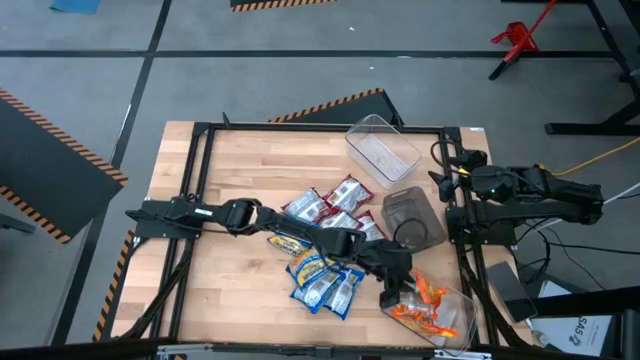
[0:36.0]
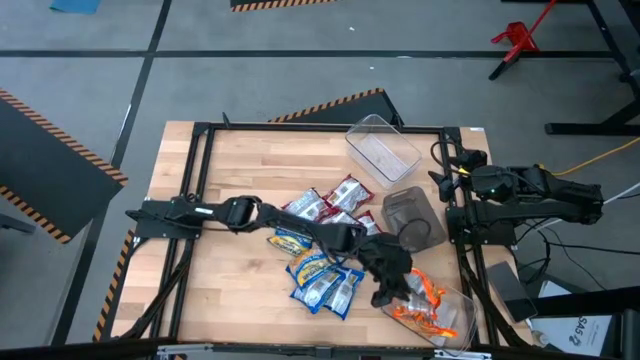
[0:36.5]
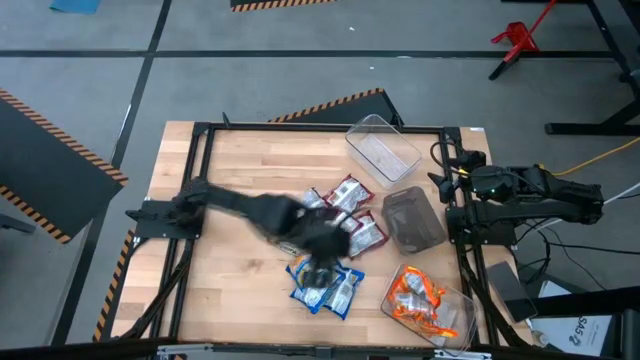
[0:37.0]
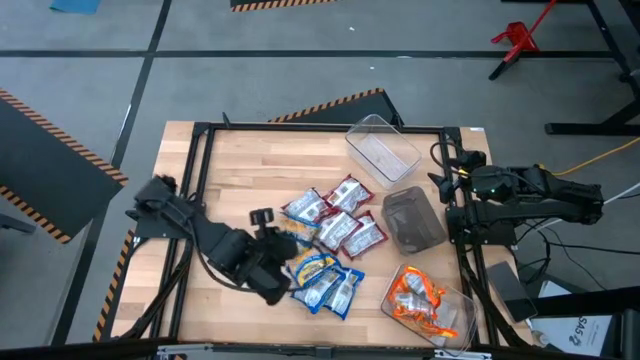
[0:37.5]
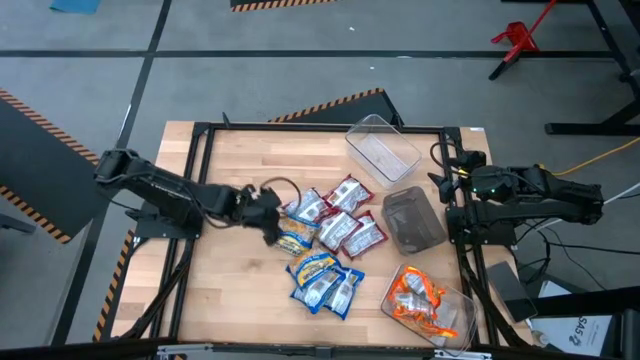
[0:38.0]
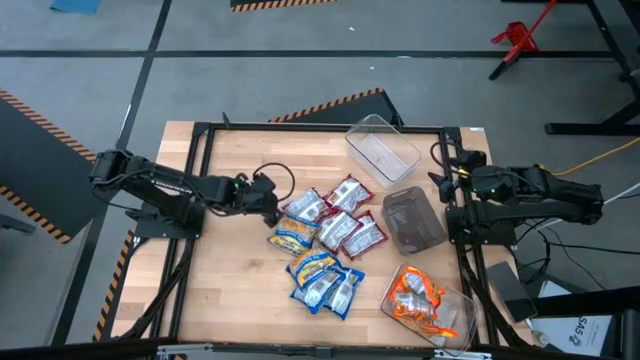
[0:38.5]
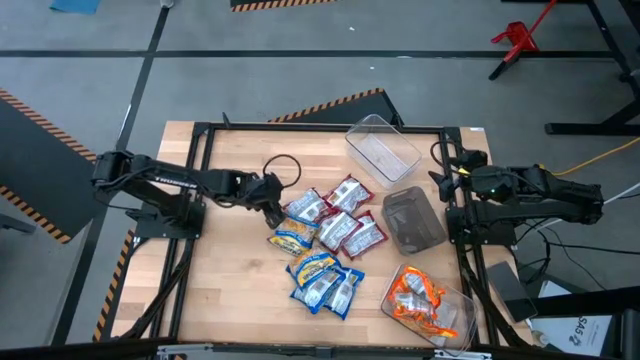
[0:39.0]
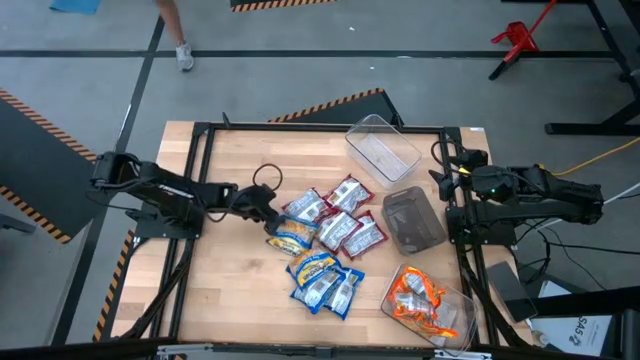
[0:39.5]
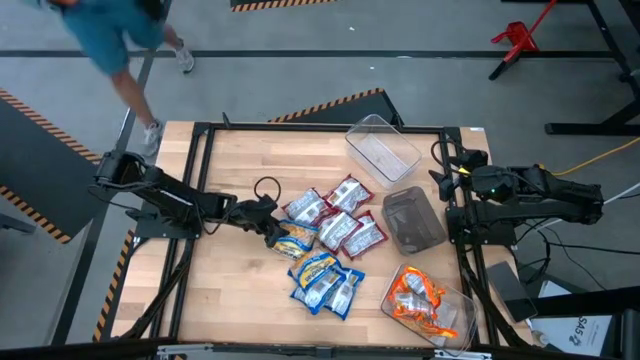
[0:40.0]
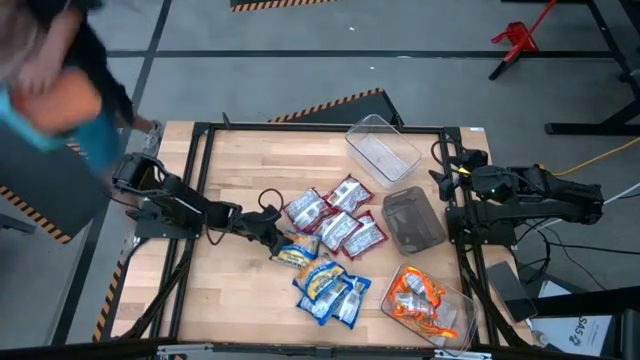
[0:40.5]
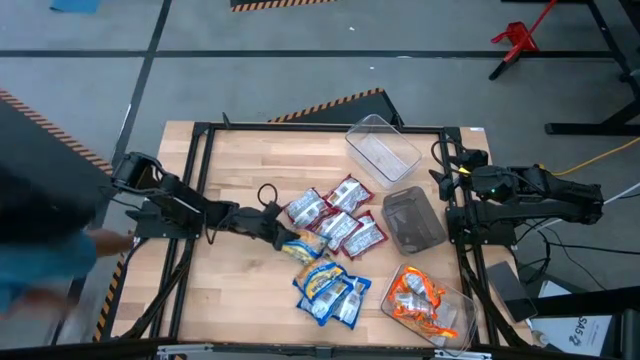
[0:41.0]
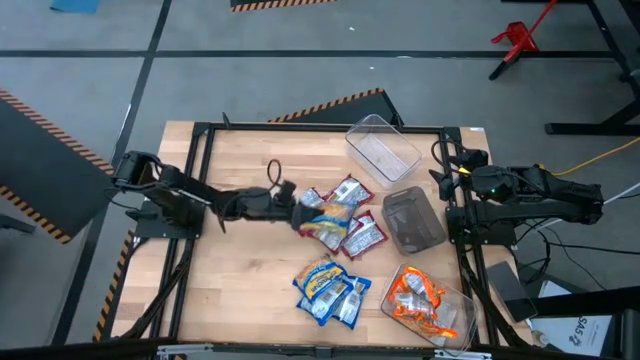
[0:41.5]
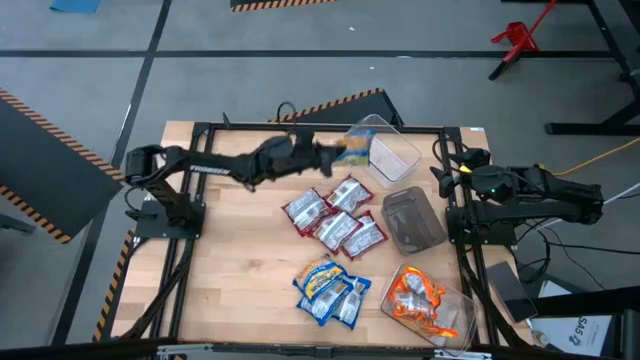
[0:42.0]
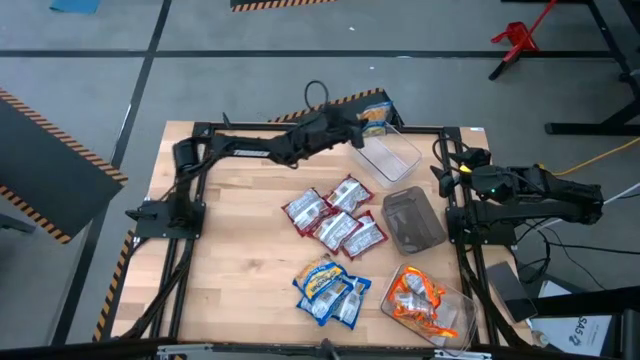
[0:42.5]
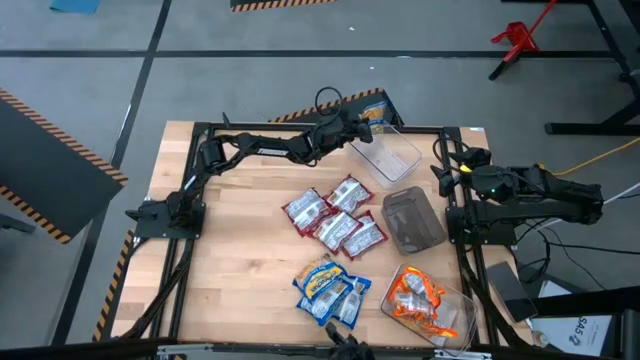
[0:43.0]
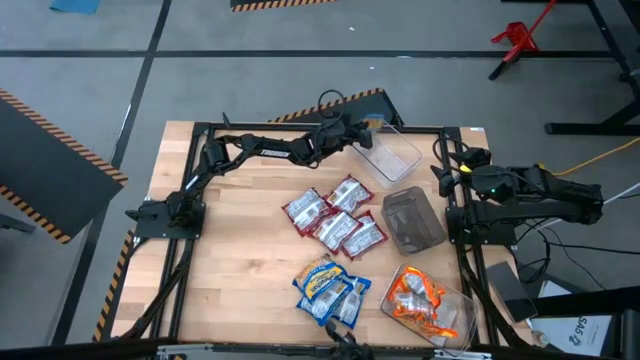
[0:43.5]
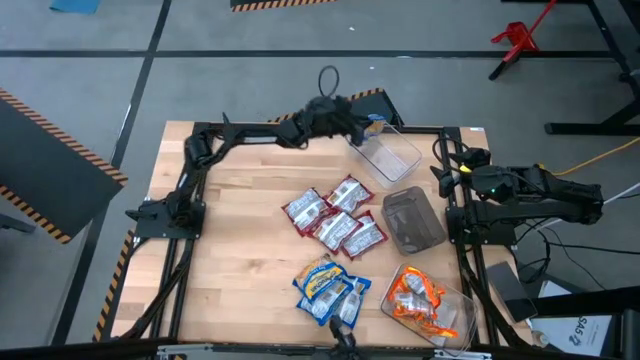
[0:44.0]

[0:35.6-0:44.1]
Task: Sort Maruchan noodles
Put the blue bag into the top transparent bin

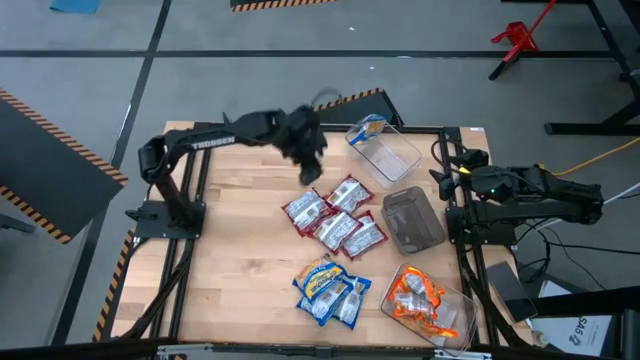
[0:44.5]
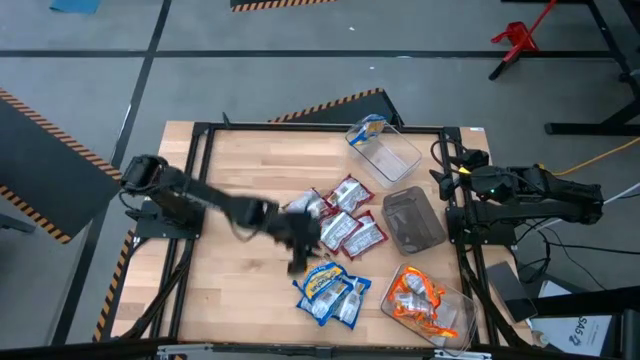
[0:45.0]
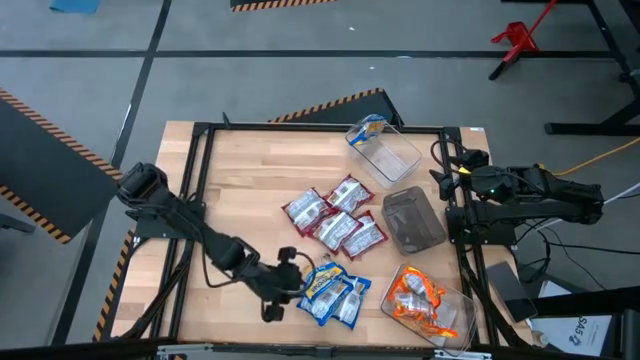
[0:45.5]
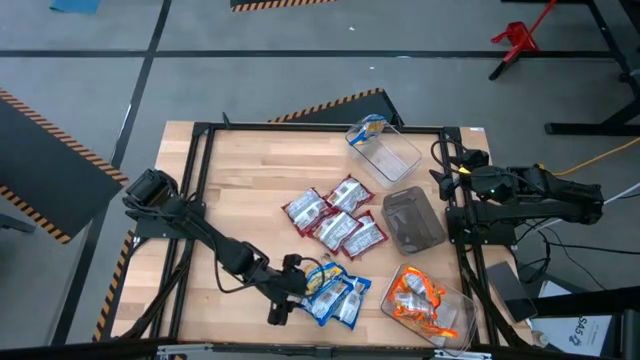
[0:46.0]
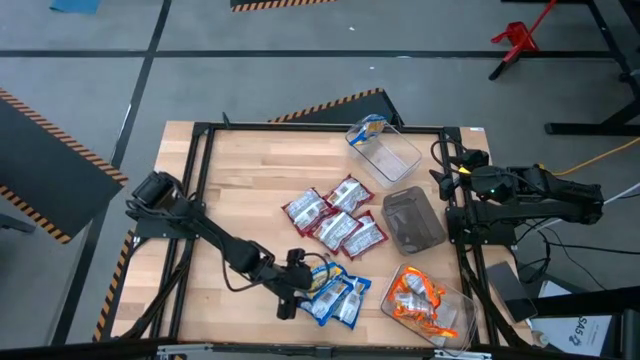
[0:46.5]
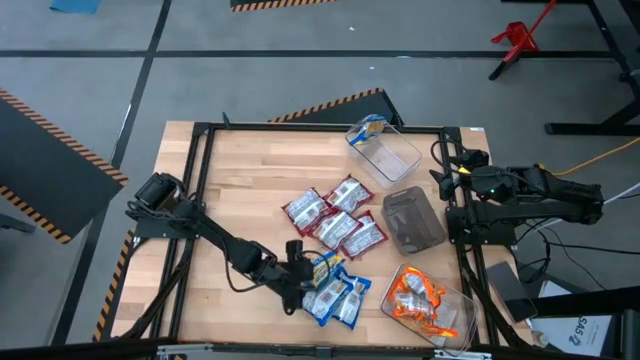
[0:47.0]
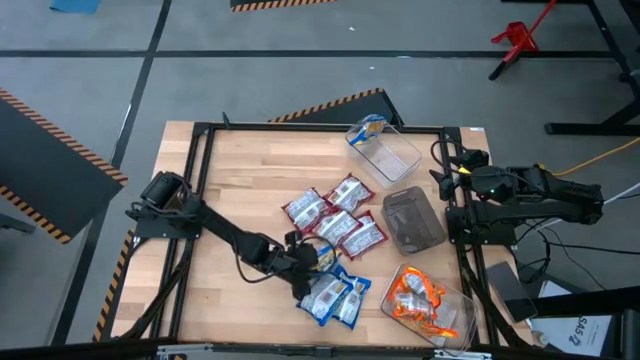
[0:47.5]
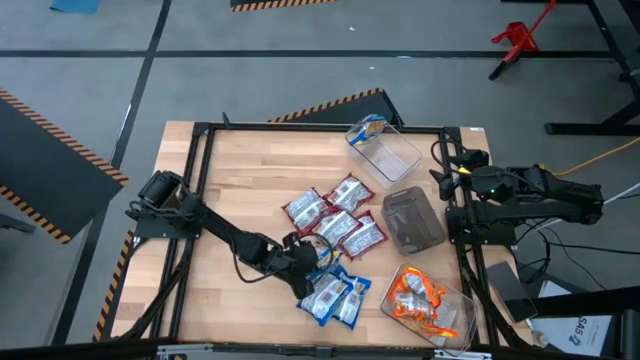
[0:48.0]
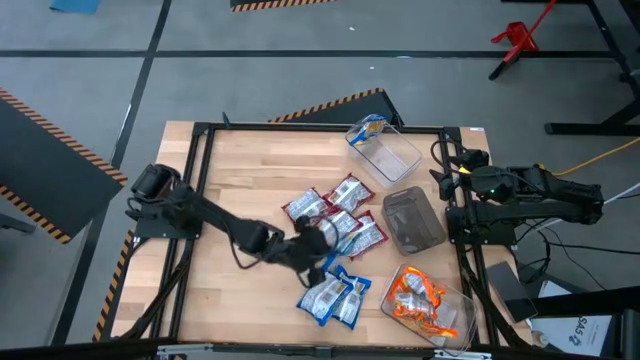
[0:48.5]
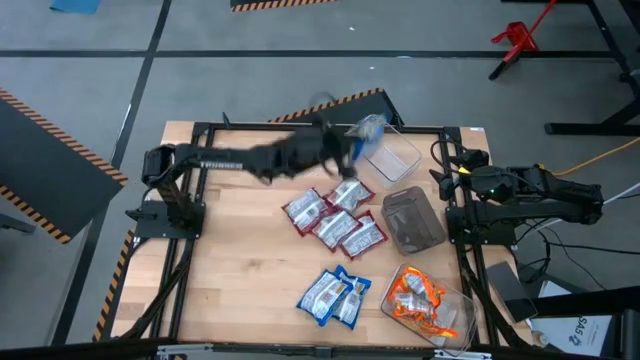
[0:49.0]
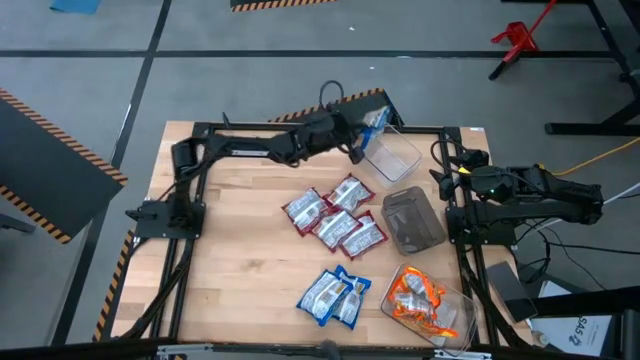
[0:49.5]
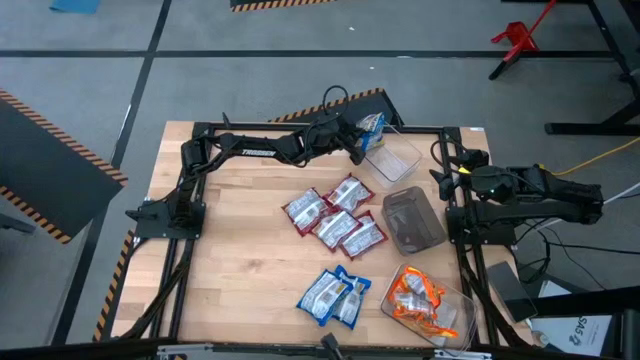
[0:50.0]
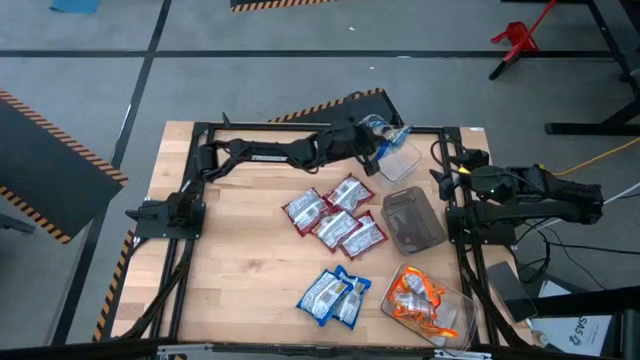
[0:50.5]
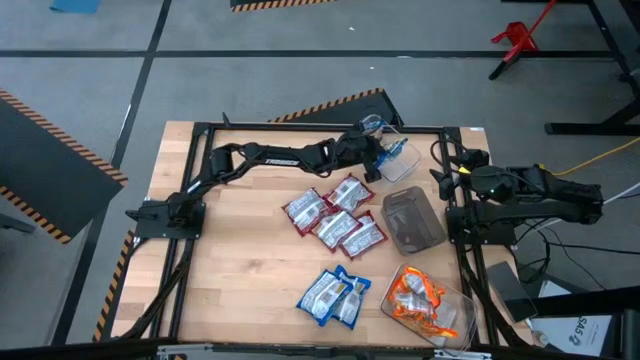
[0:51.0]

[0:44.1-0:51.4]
Put the blue bag into the top transparent bin

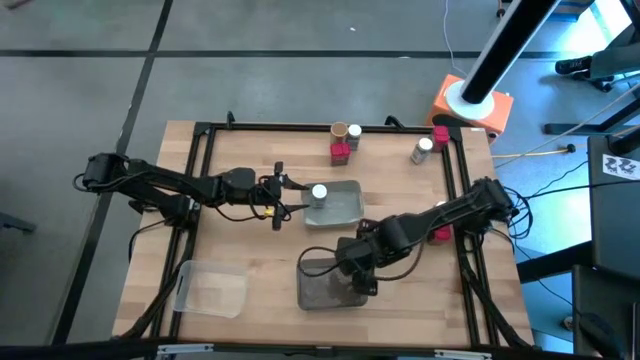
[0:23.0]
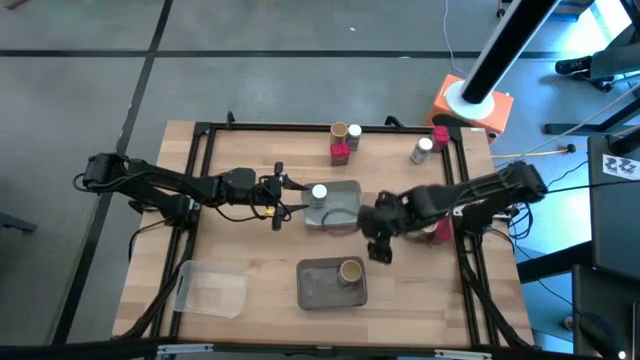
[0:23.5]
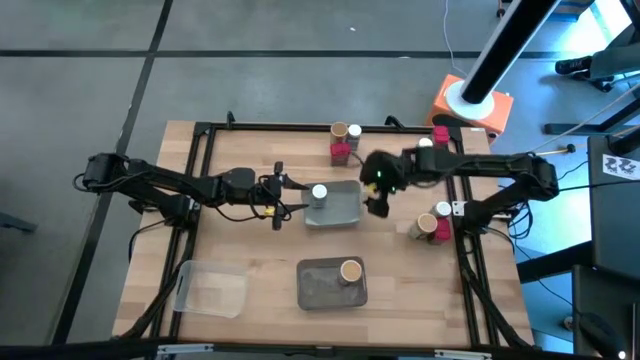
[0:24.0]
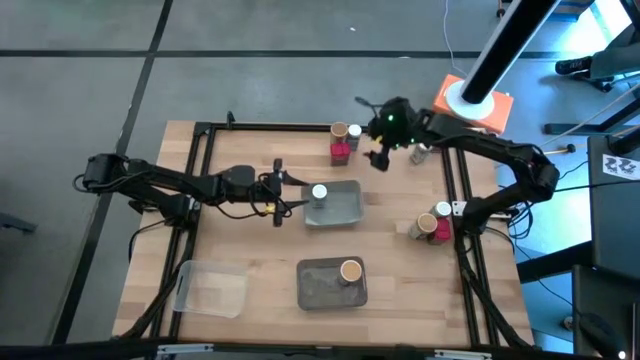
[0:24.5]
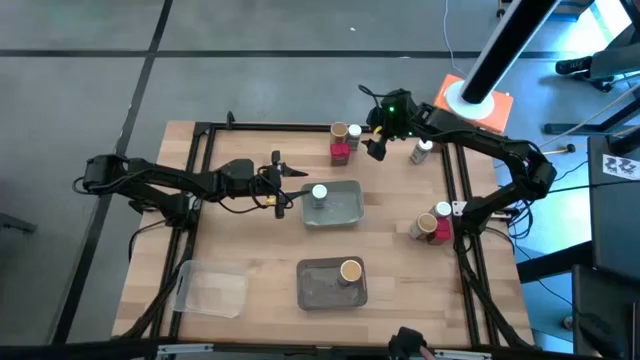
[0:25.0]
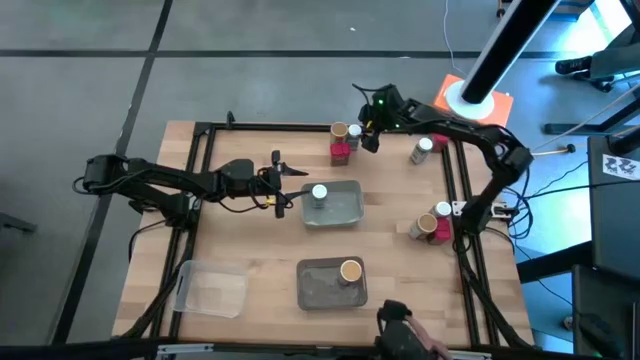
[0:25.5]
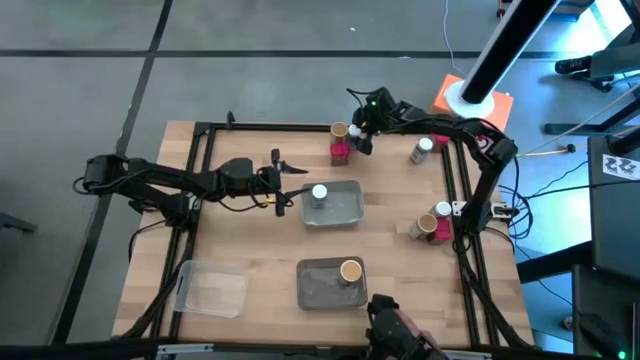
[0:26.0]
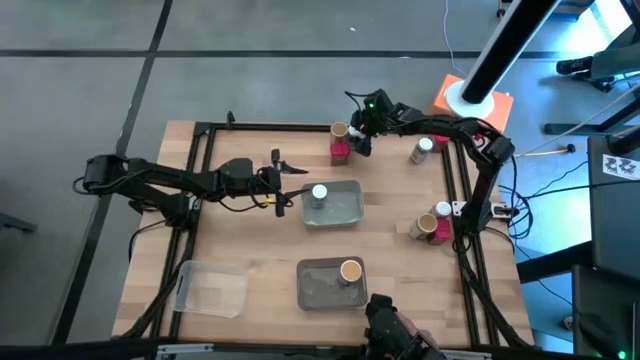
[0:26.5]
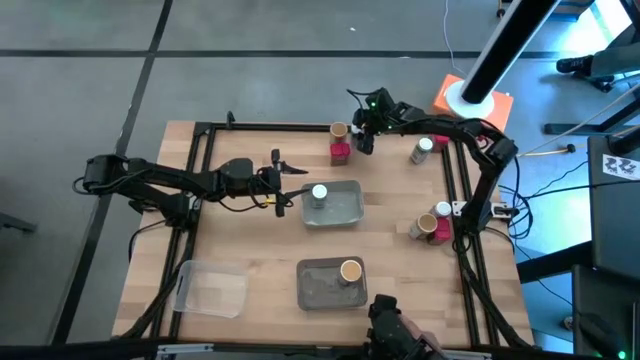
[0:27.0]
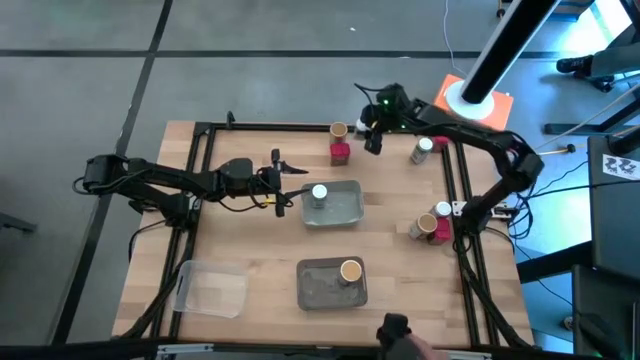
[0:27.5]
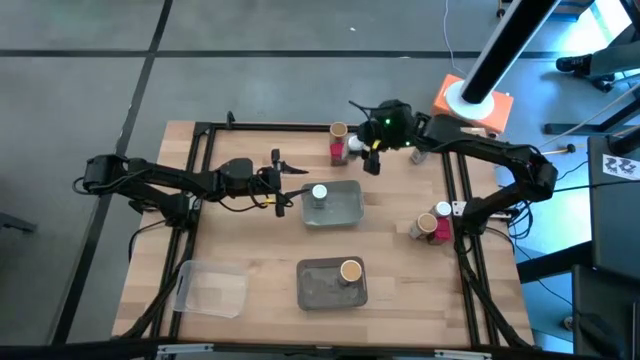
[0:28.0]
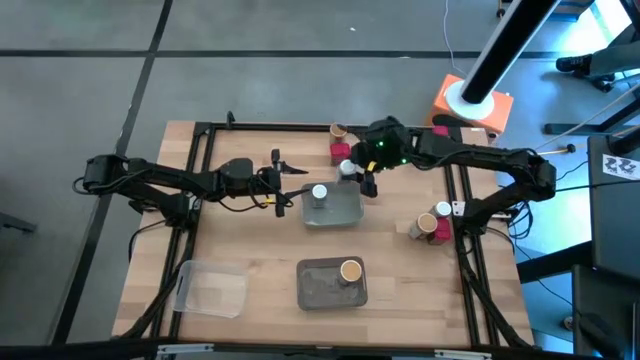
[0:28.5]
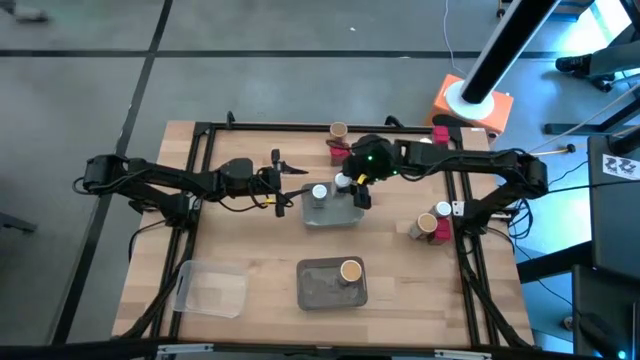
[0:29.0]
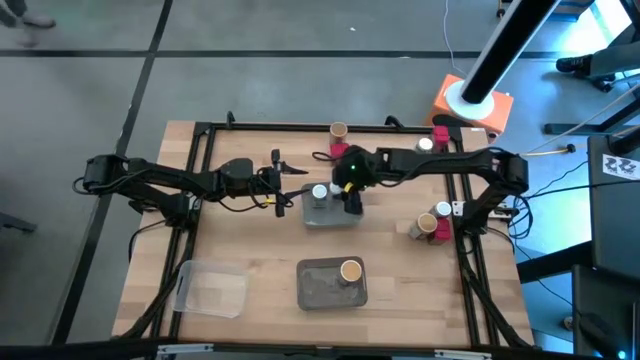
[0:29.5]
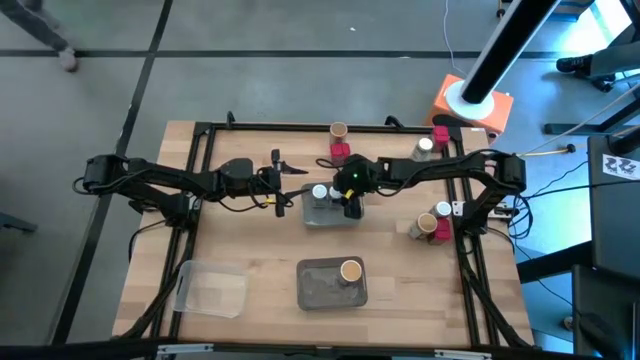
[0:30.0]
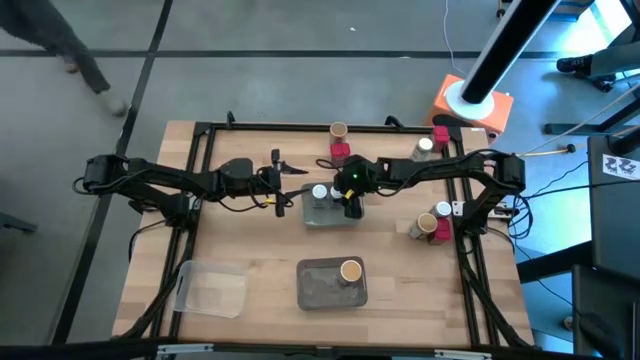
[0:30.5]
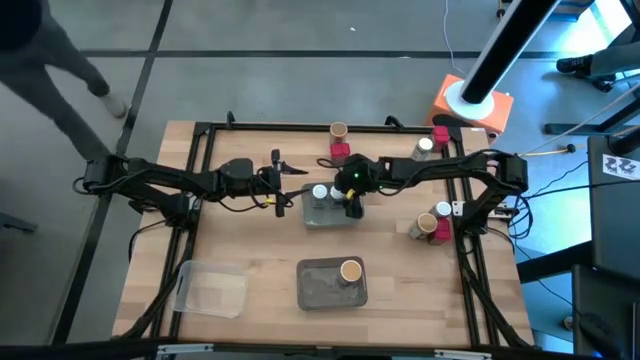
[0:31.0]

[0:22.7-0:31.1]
Task: Sort spices by type
Put the top left white seasoning bottle into the gray bin aligned with the other white seasoning bottle
